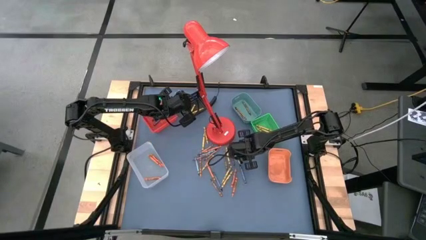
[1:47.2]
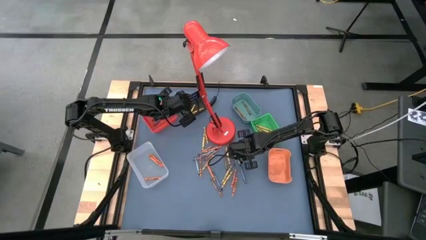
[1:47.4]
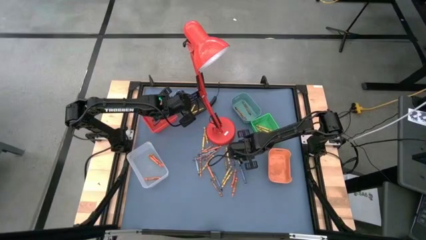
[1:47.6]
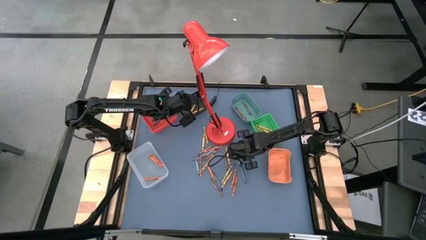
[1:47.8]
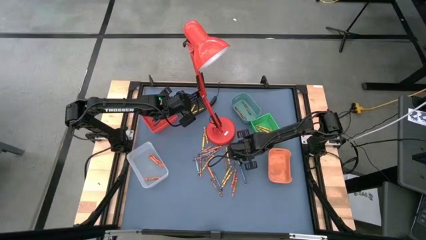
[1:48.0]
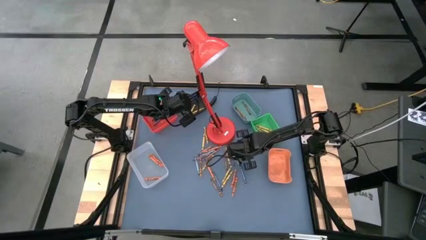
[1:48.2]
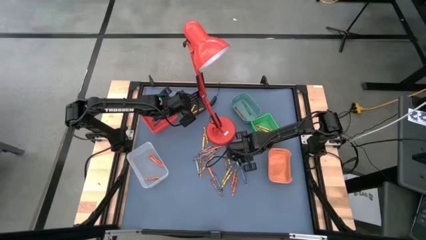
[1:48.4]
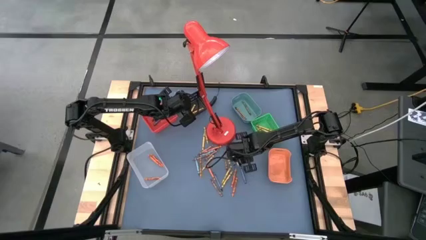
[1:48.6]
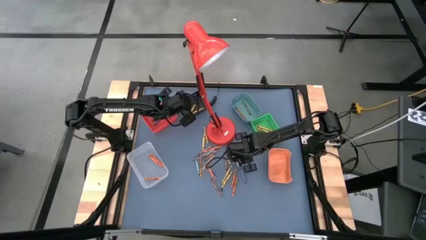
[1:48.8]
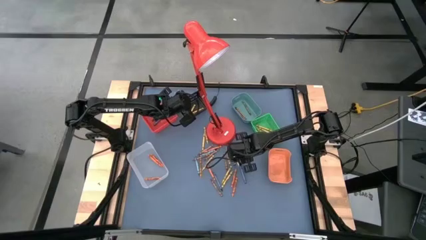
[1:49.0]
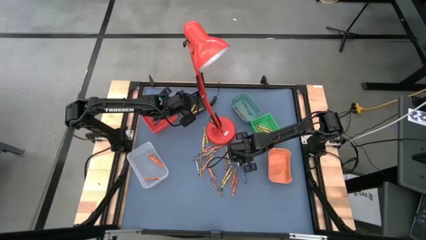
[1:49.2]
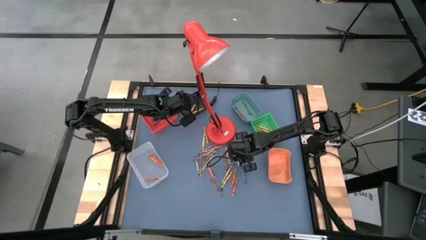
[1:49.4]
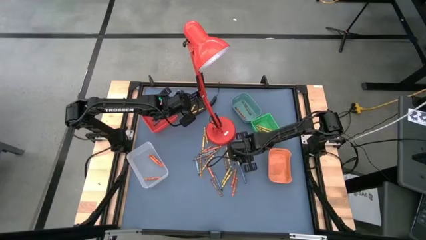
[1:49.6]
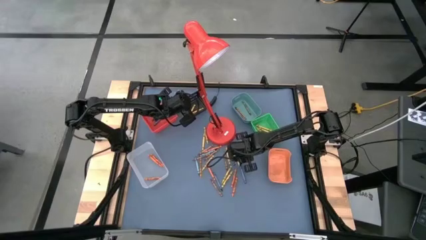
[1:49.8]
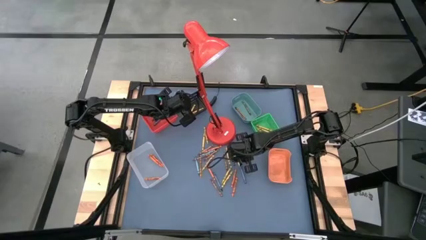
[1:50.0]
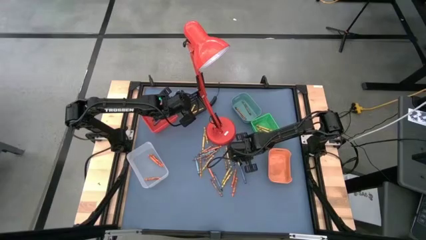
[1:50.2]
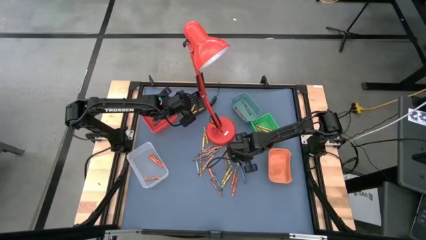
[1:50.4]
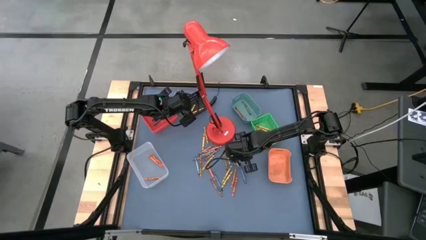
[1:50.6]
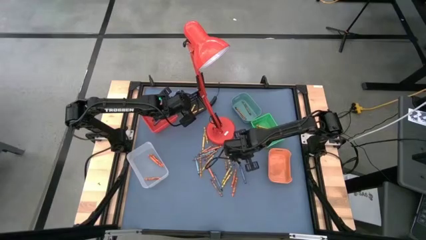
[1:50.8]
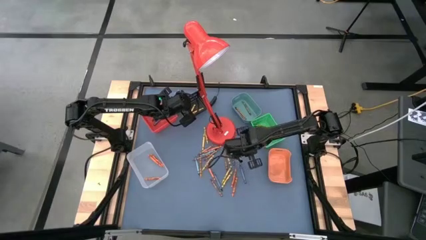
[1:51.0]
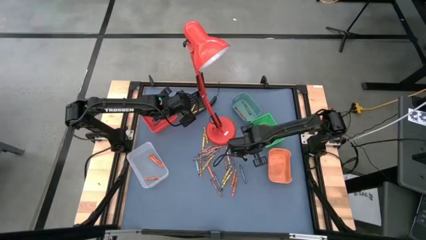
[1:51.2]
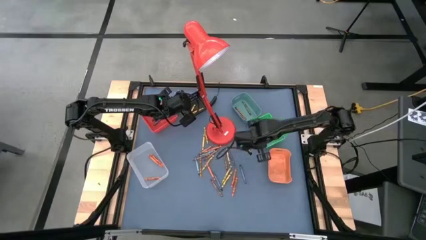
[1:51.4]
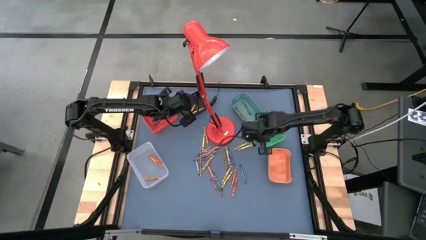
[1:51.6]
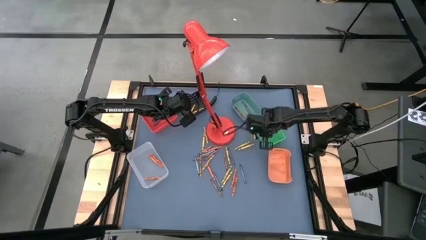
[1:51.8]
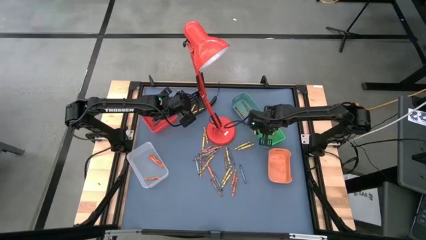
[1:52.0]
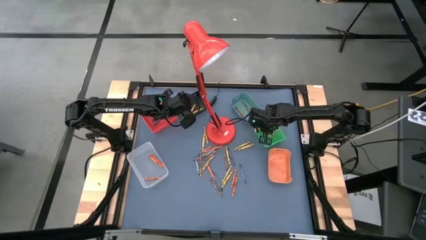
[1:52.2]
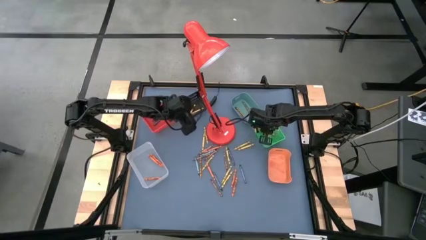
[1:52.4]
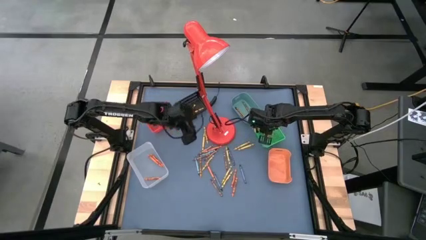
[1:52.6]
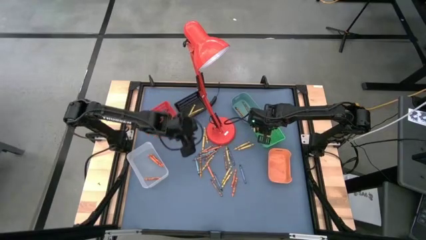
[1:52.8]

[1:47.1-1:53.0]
Task: Sort crayons
Put the yellow crayon into the middle right green bin

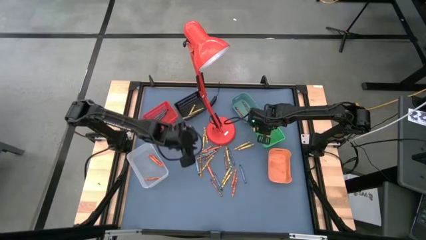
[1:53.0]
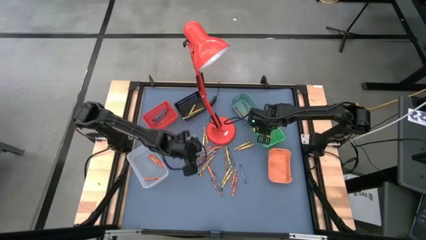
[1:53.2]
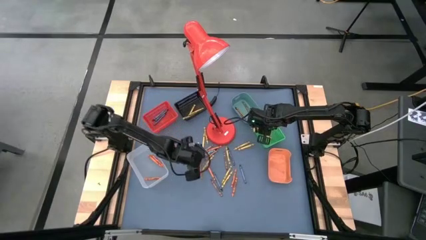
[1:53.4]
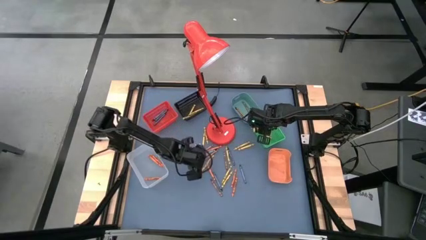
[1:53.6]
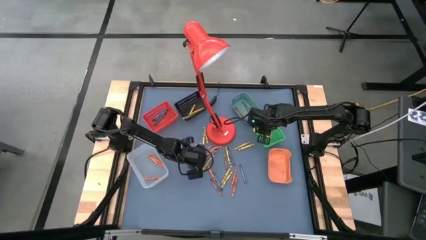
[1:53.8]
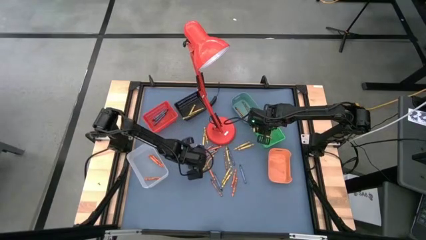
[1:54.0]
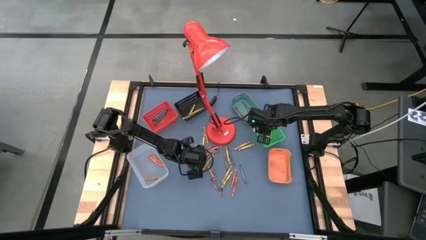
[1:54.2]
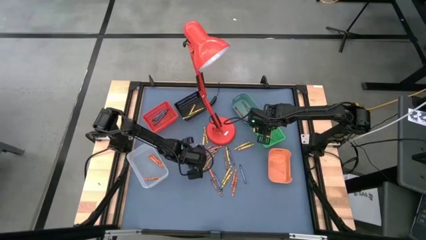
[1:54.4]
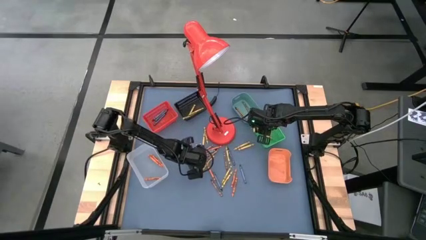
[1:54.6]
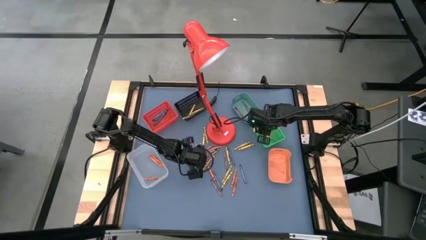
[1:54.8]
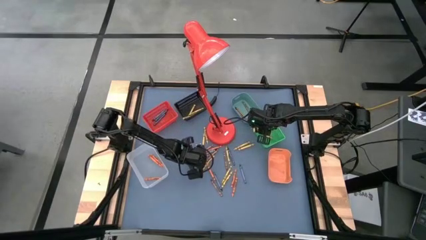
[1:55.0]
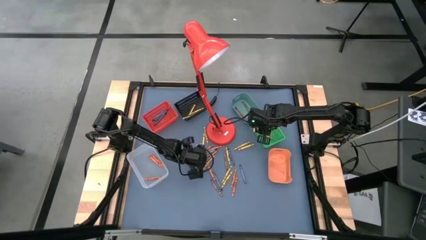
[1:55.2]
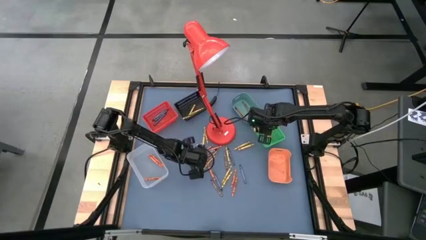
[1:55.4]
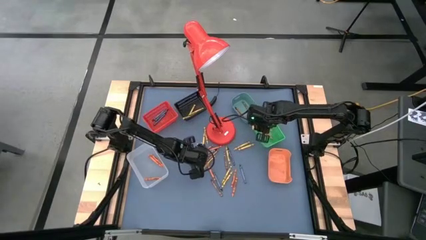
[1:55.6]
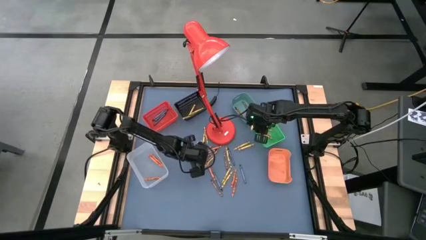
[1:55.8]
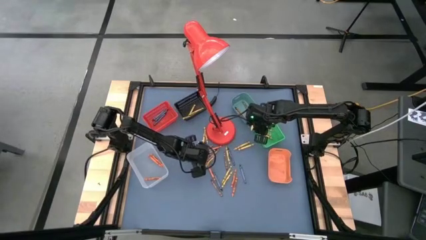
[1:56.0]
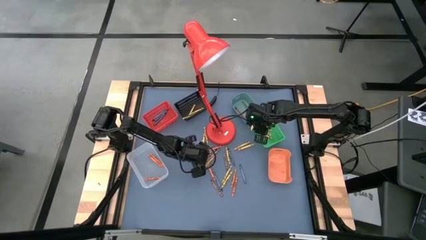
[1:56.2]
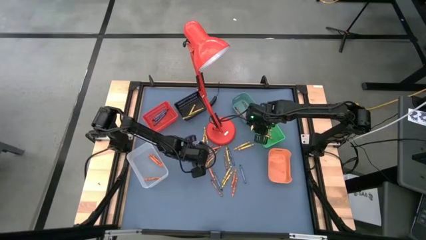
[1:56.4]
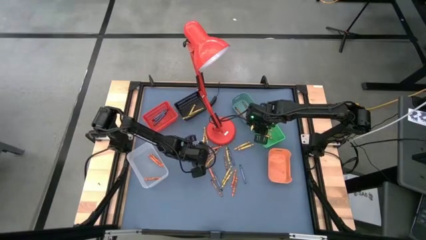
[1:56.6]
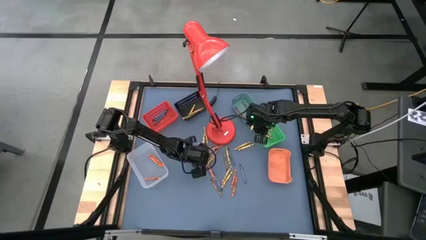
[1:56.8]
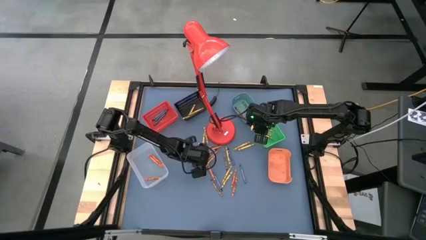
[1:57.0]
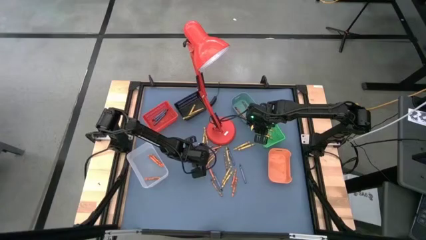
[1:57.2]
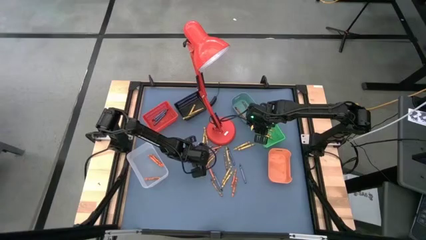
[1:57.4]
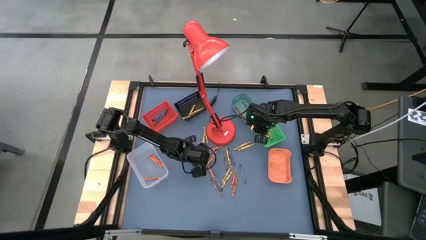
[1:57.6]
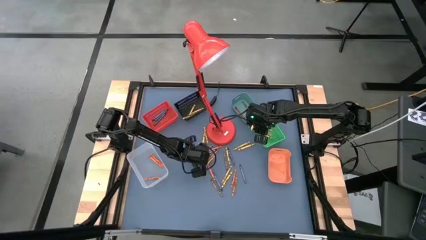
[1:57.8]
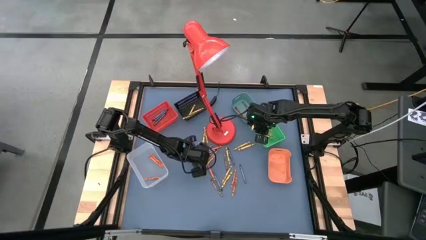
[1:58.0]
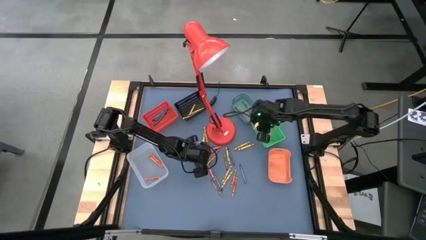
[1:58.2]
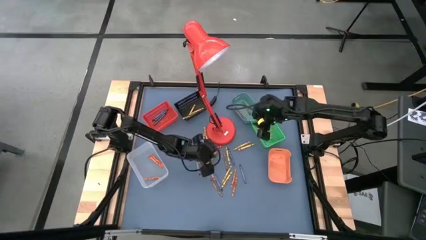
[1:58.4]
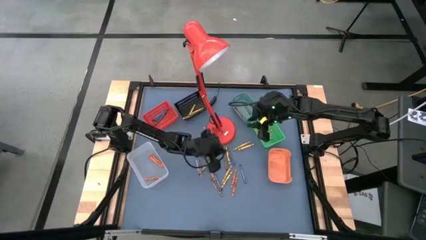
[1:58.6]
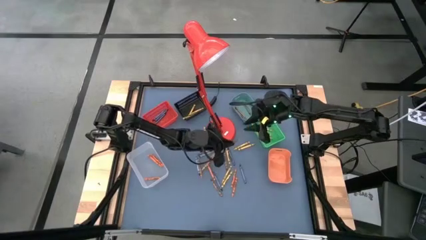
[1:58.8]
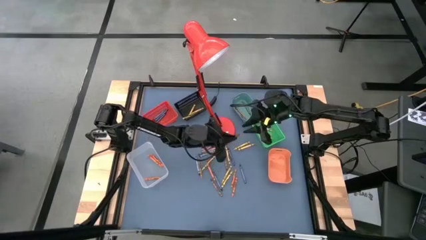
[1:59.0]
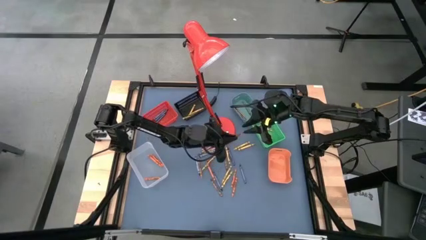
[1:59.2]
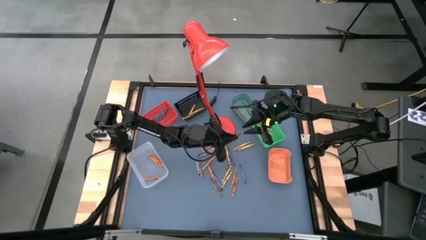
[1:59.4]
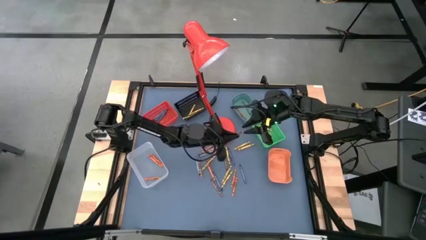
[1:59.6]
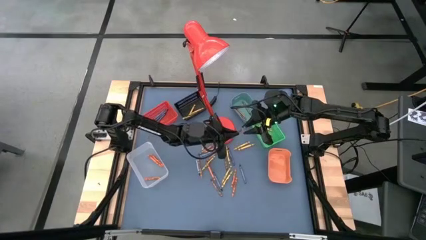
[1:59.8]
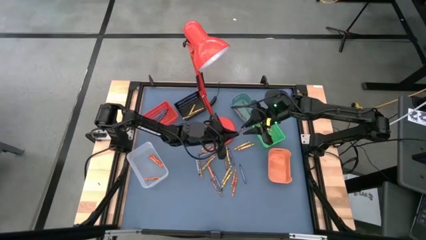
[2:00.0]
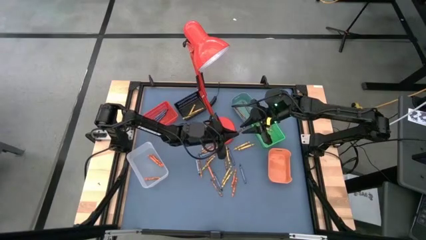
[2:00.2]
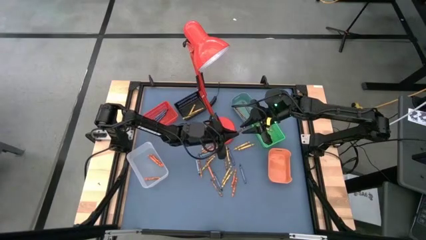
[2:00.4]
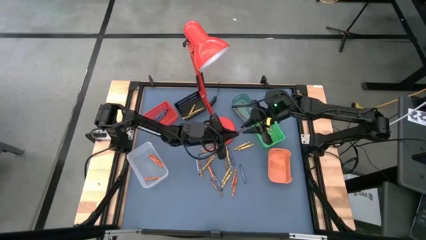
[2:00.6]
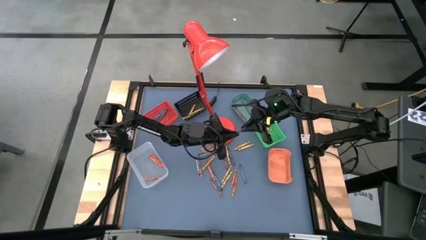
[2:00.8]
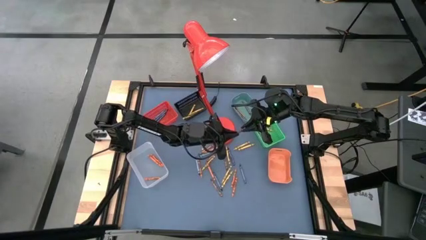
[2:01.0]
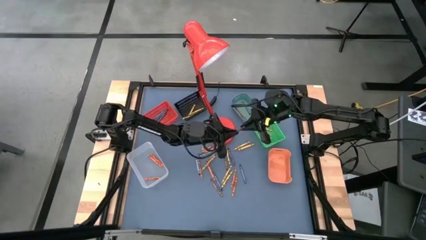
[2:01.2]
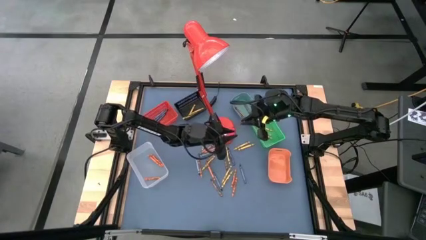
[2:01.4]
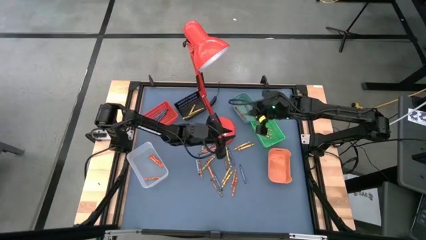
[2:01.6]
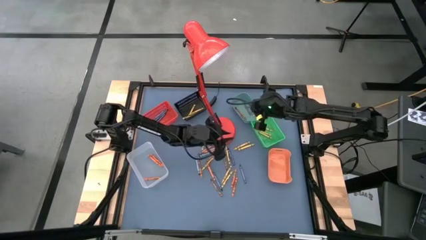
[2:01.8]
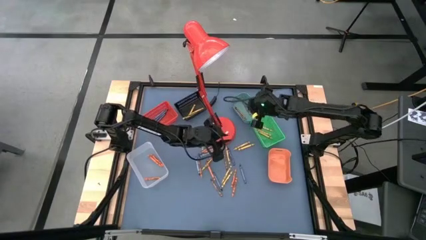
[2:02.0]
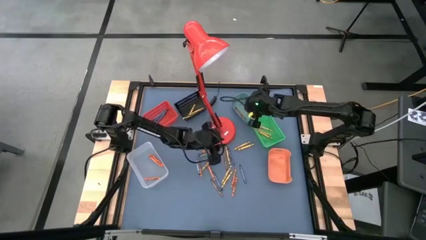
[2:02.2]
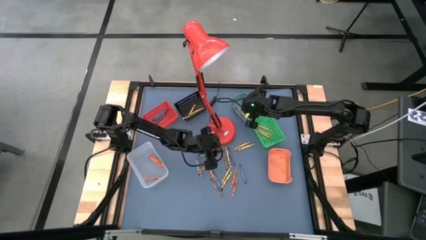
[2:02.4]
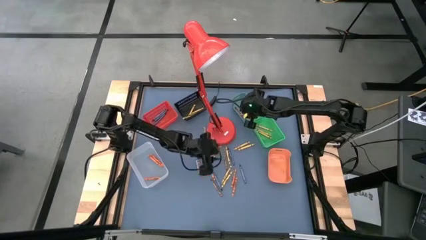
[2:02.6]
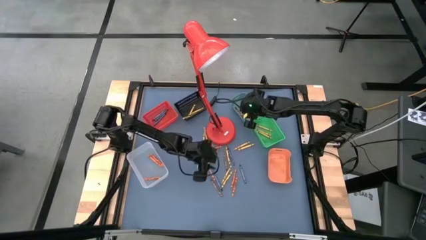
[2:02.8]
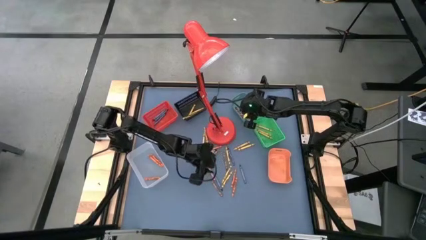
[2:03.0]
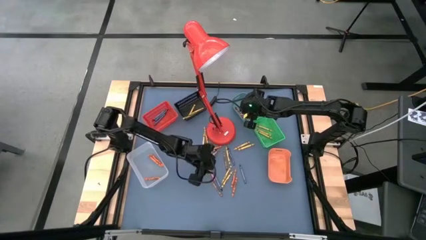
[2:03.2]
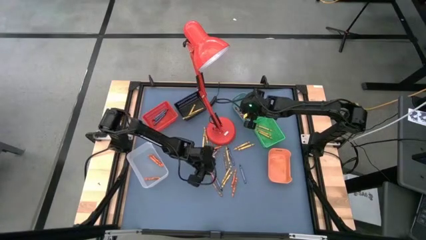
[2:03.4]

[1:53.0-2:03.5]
Put the brown crayon into the top right blue bin
